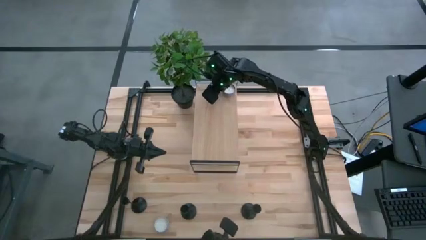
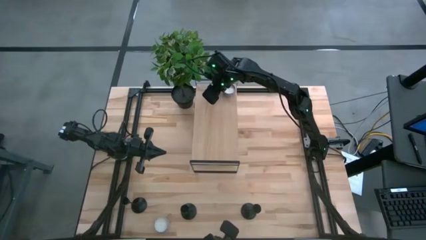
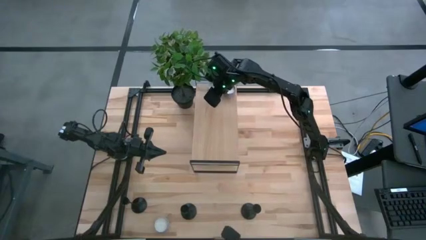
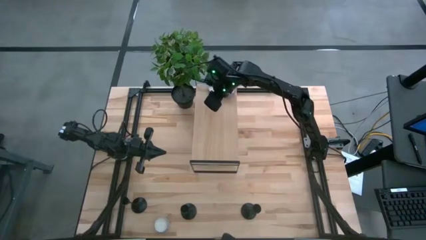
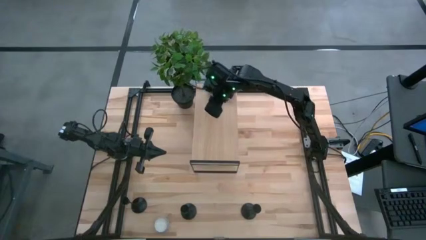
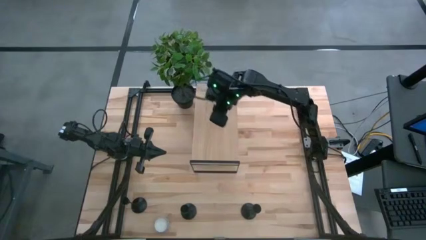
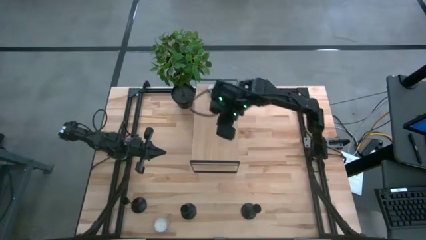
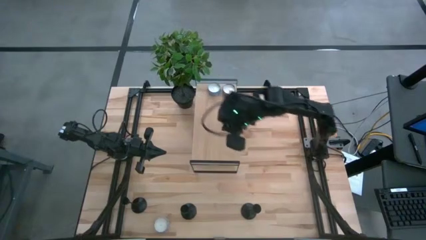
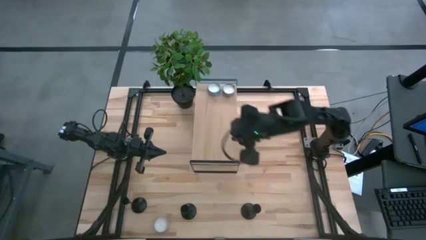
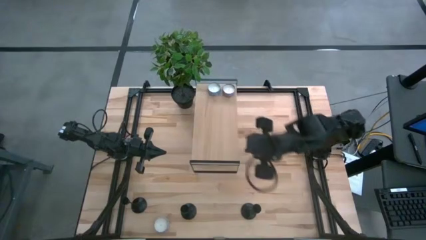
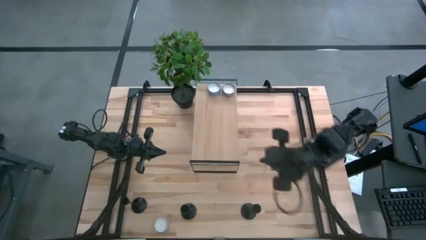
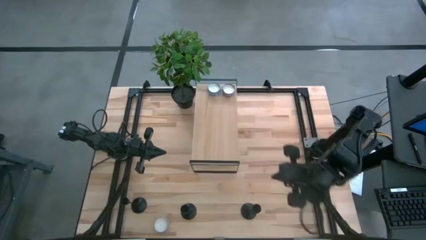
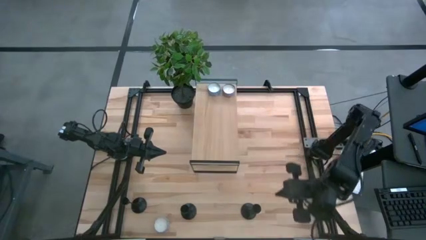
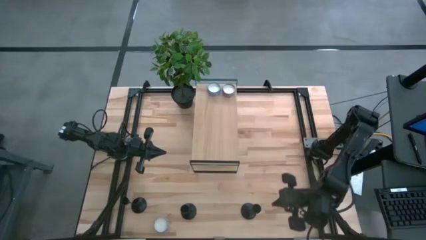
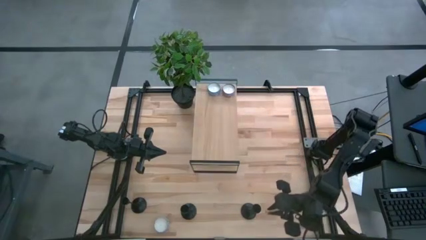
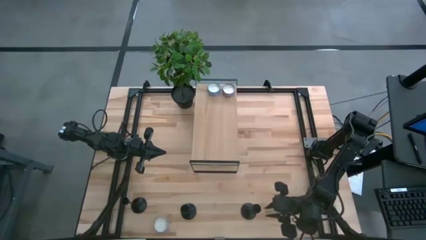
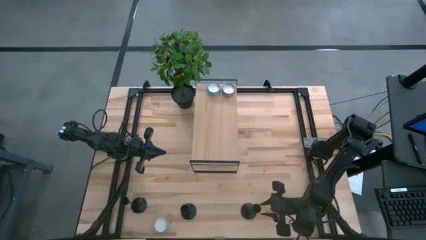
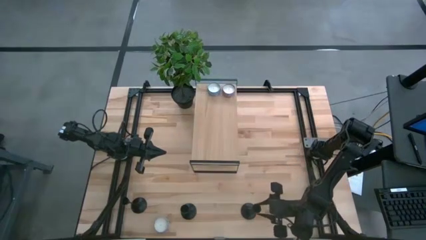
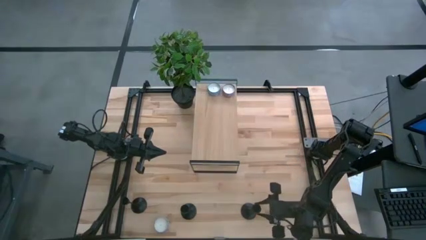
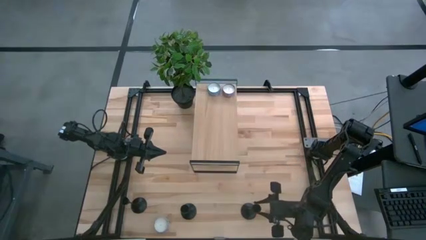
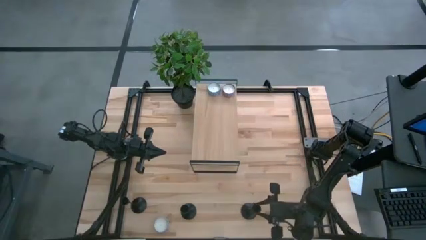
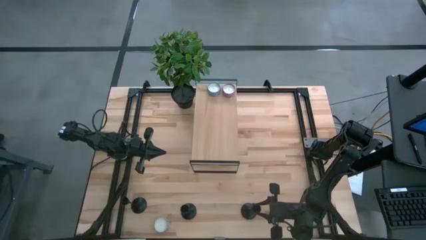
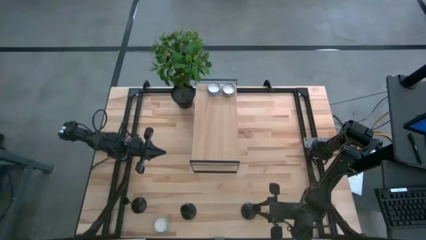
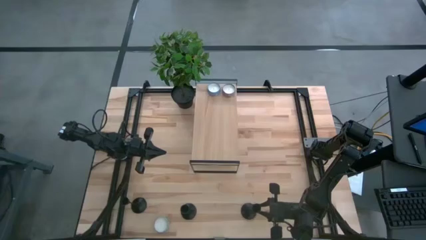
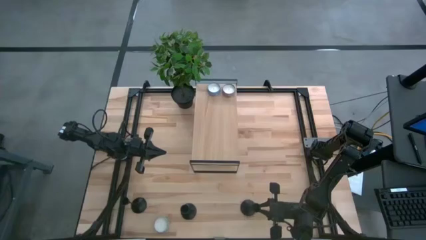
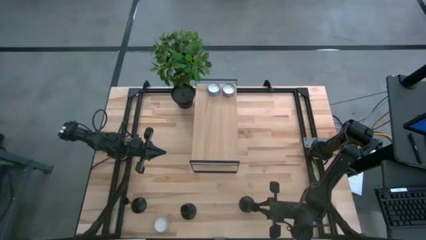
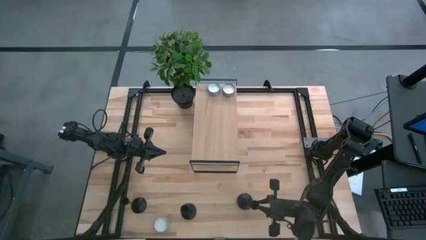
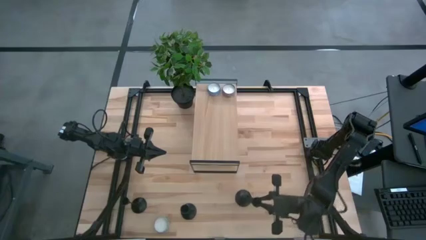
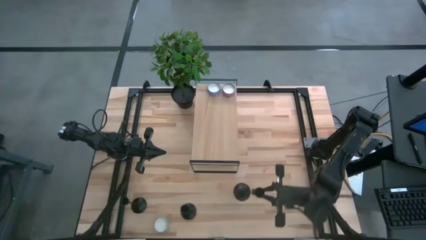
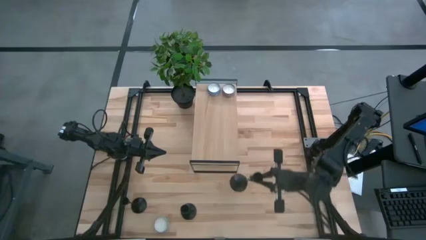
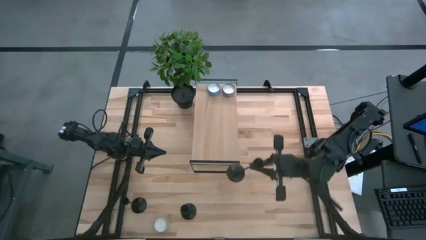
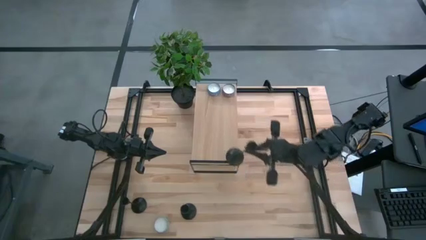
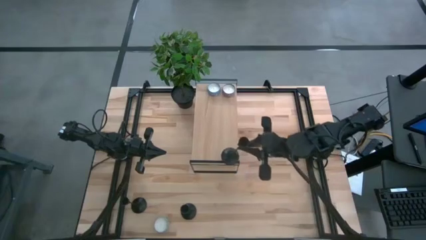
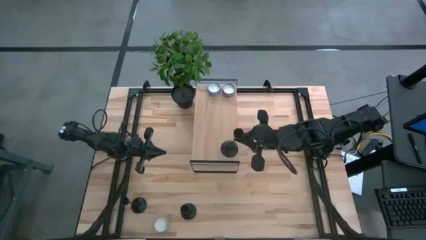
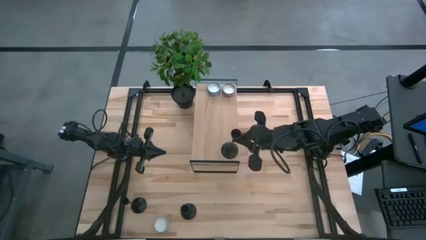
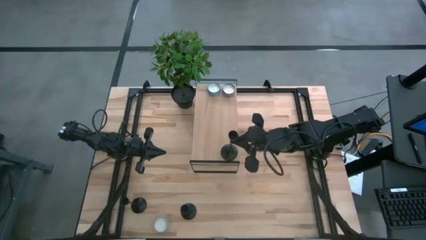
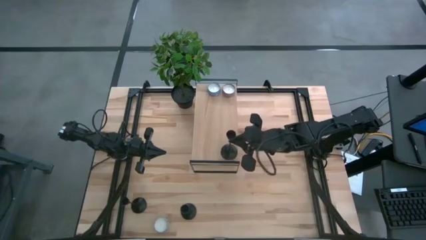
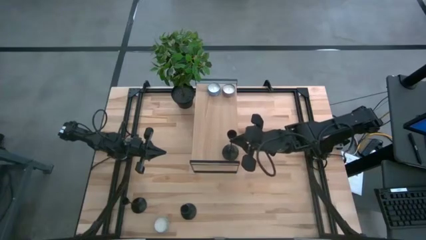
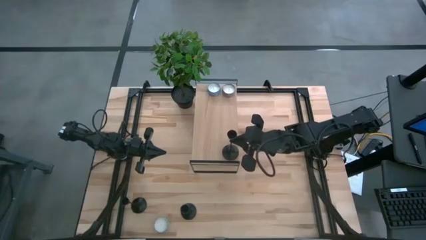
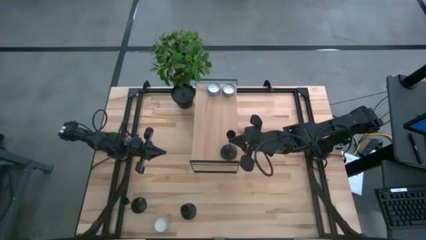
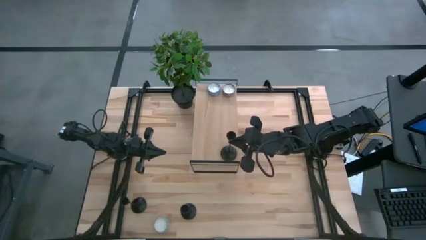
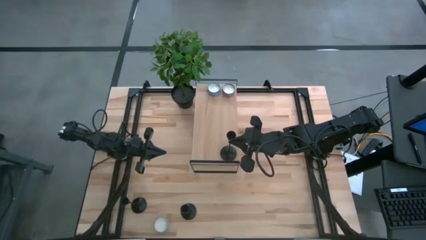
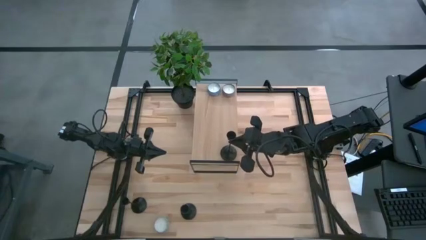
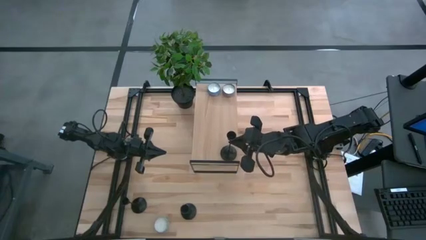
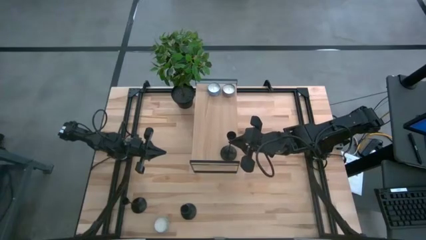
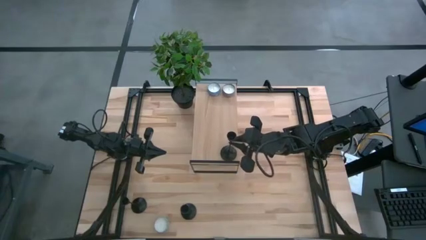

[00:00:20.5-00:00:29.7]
Task: Pick & Place candle stick holders
Put the right black candle holder on the shelf

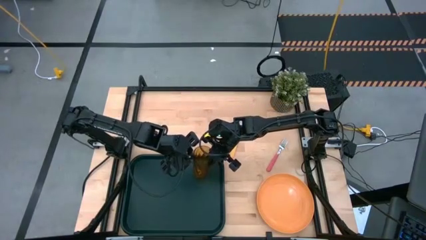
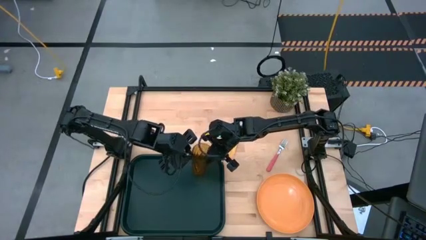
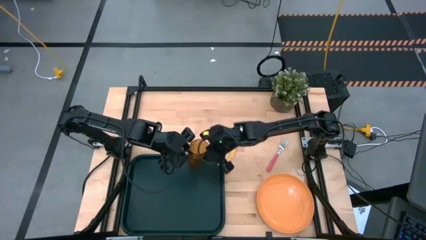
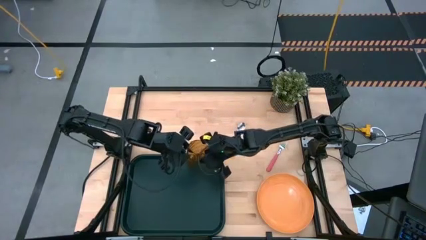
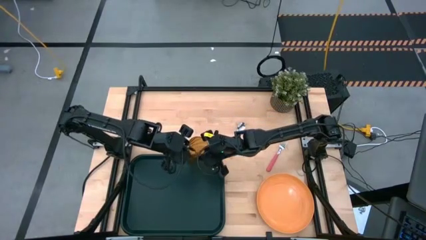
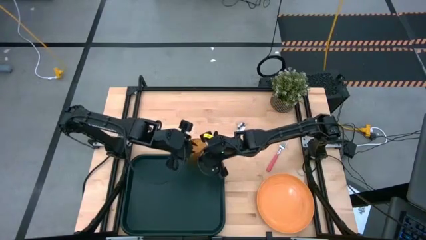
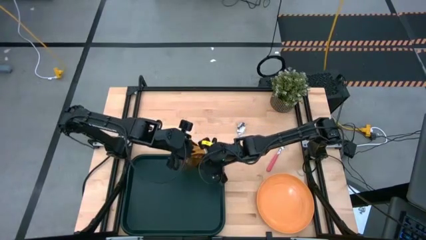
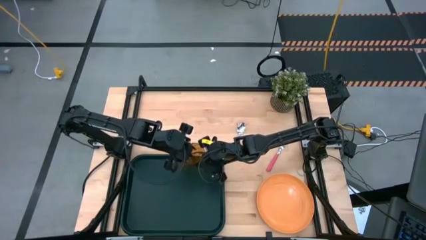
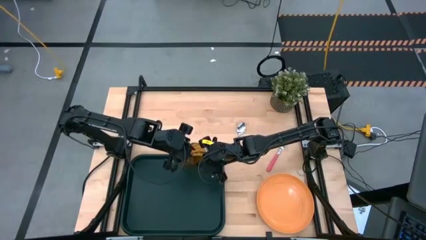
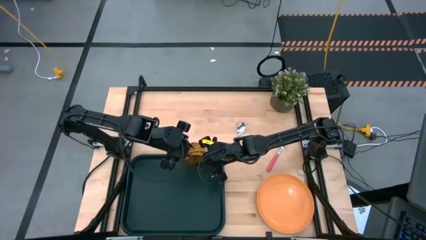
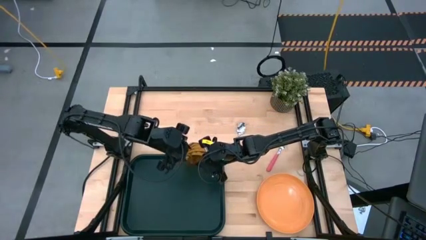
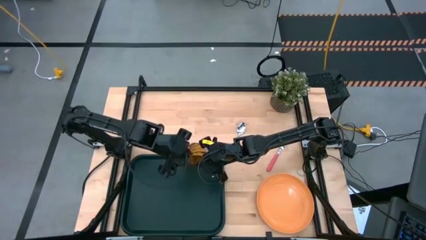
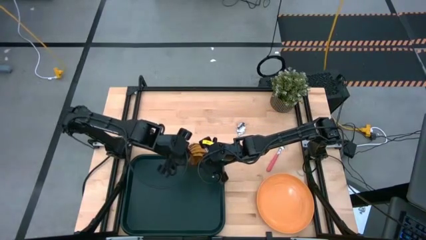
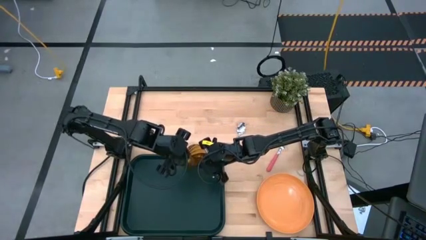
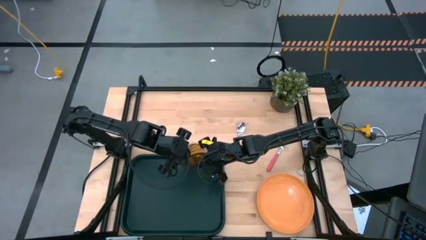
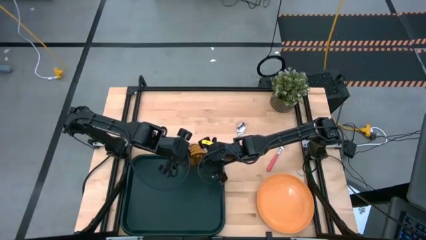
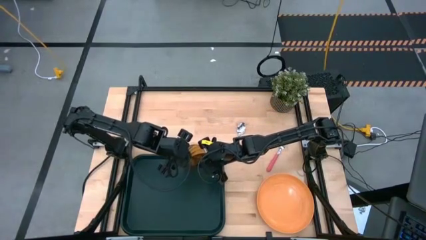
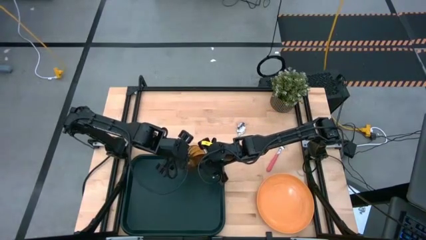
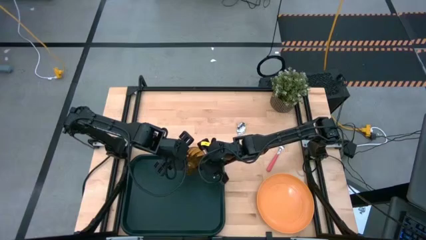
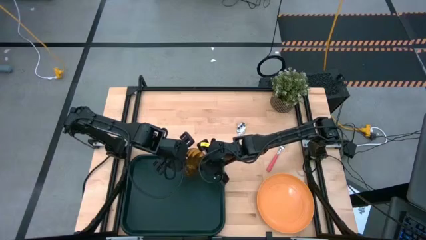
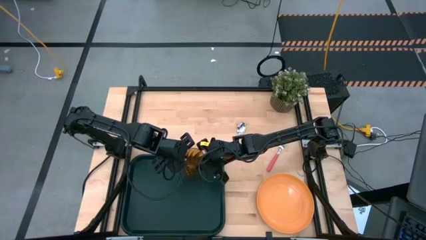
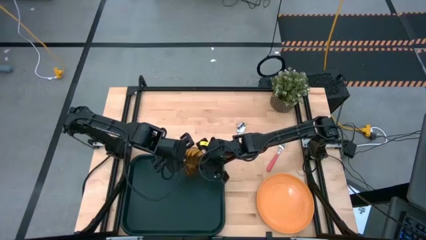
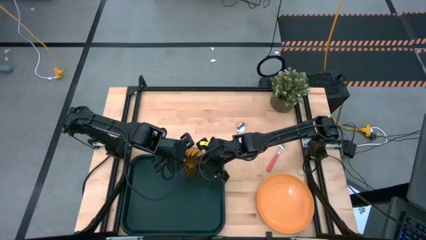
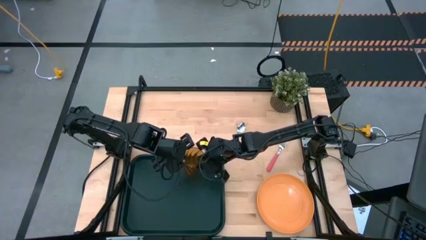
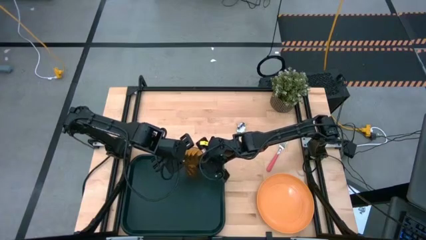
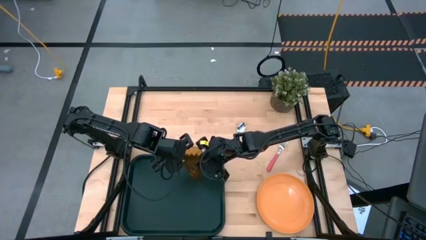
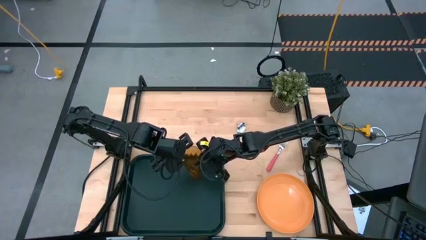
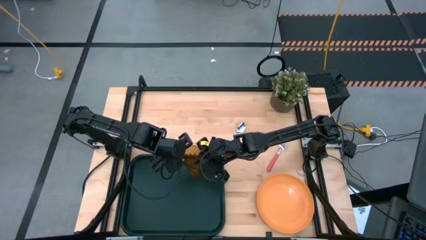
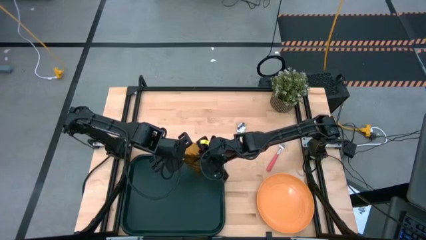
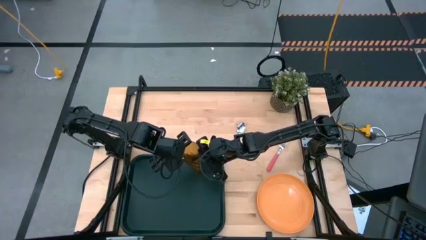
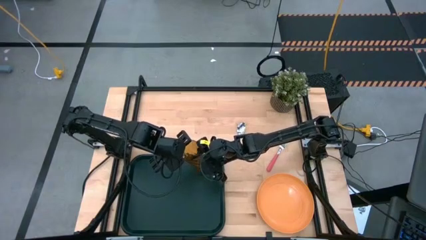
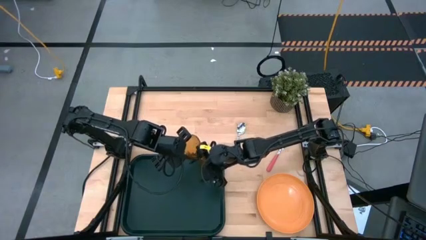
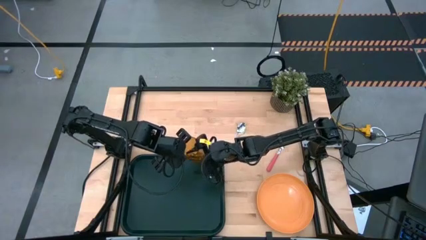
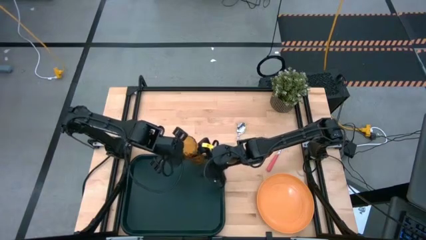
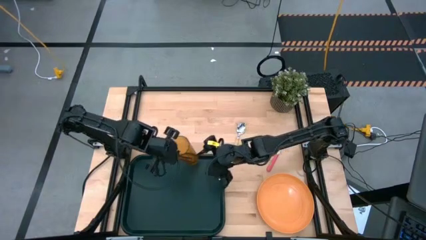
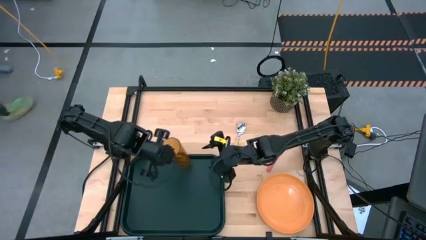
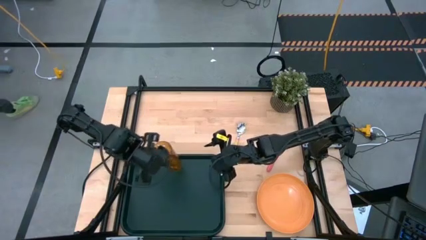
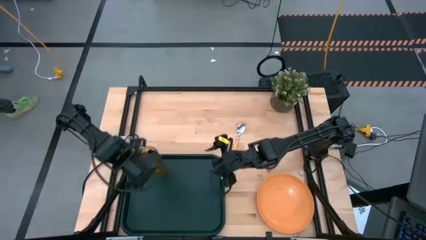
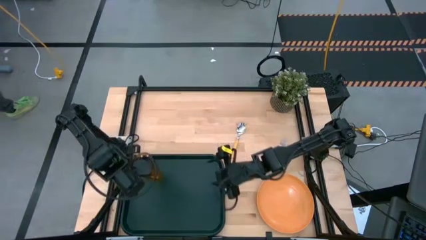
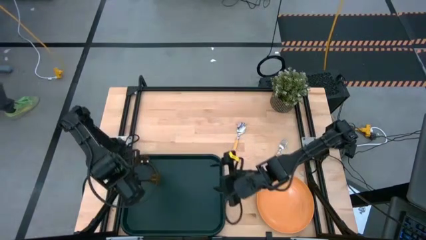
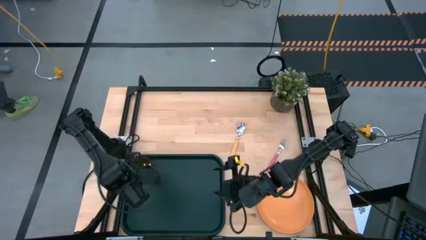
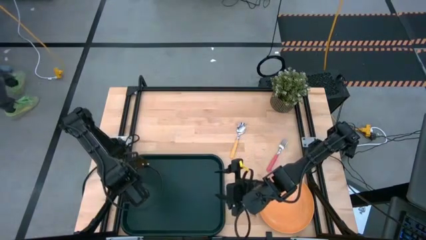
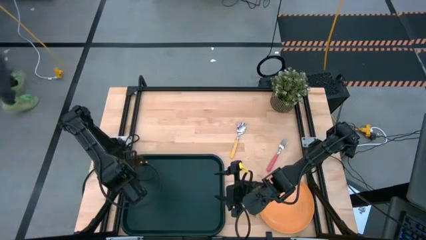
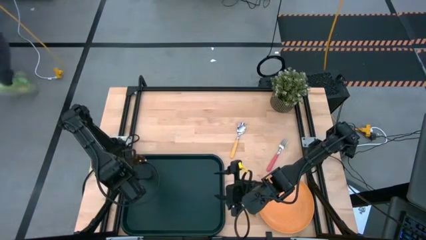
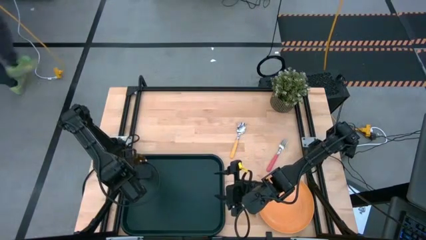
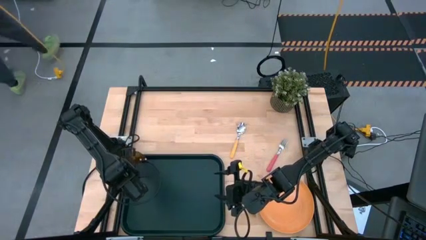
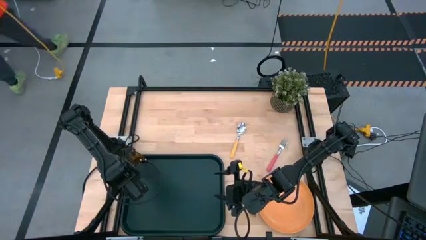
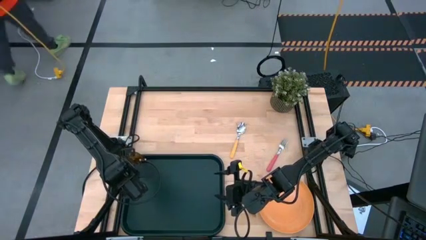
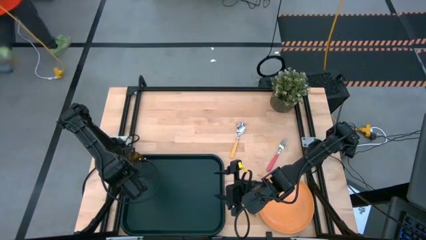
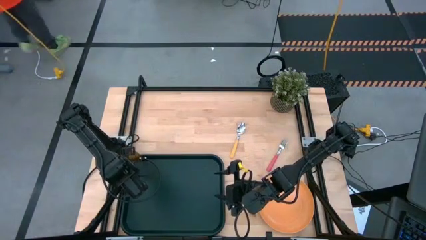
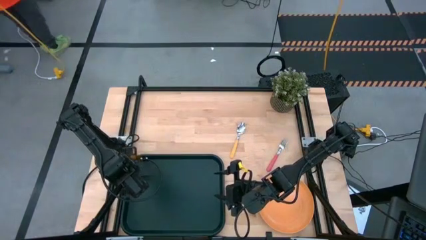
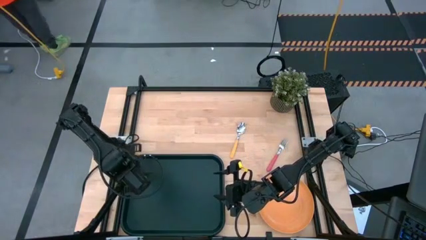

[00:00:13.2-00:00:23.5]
Task: Pick and place plate/cup/fork/spoon on tray
Put the orange cup on the black tray
